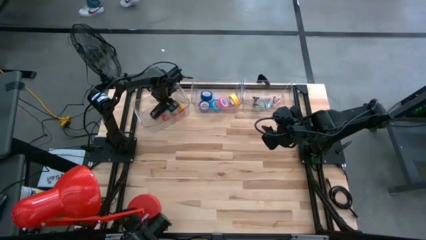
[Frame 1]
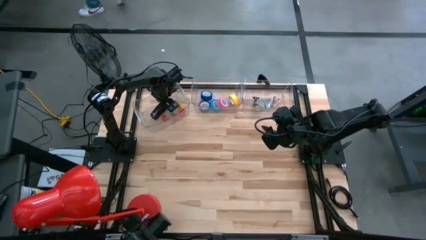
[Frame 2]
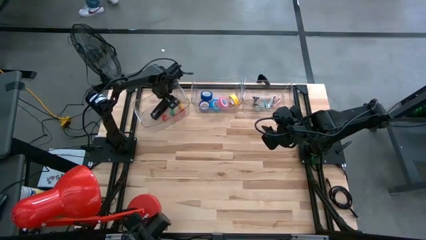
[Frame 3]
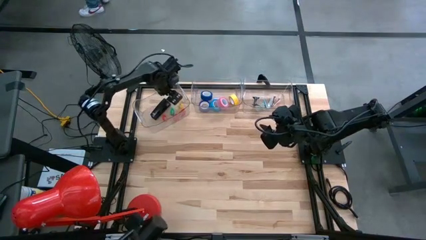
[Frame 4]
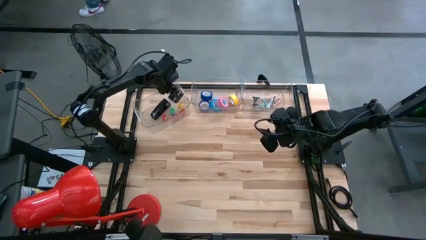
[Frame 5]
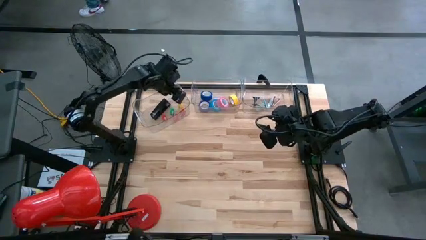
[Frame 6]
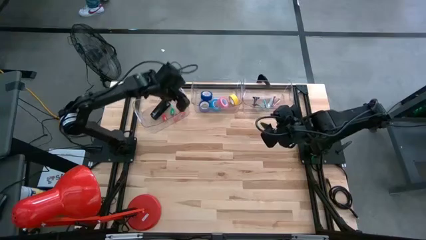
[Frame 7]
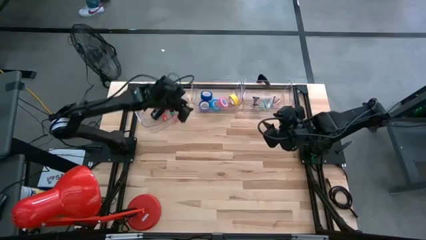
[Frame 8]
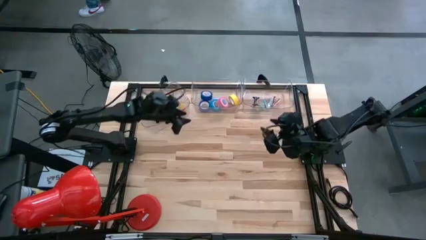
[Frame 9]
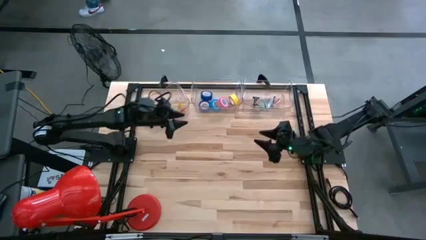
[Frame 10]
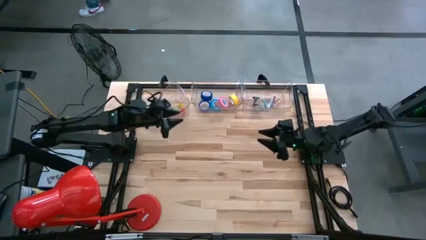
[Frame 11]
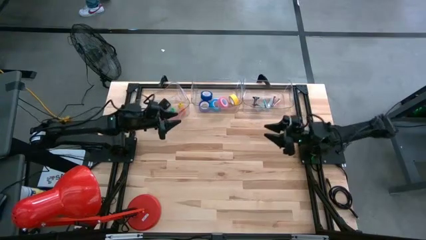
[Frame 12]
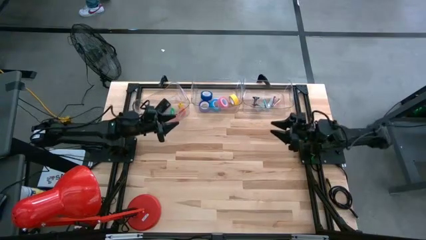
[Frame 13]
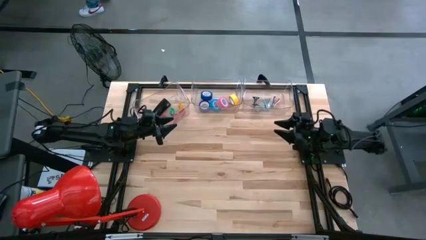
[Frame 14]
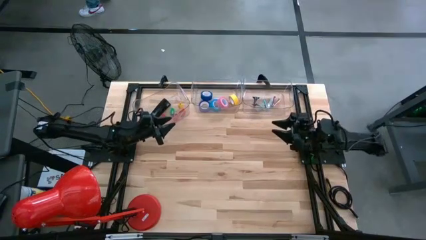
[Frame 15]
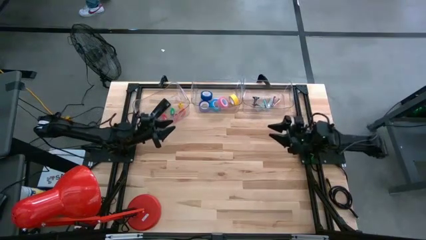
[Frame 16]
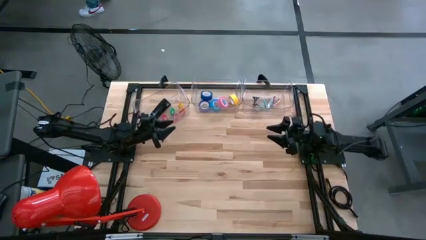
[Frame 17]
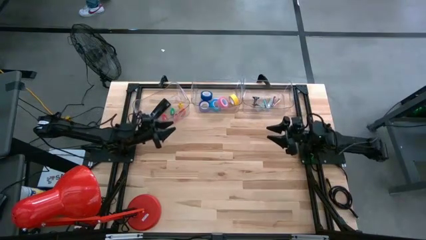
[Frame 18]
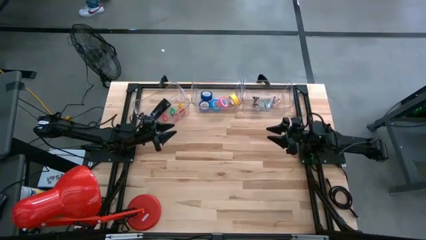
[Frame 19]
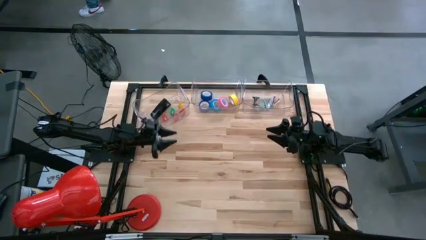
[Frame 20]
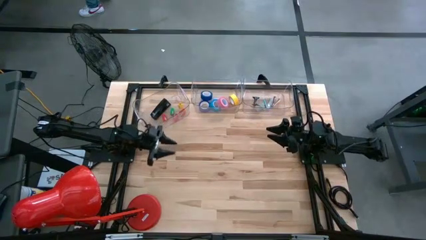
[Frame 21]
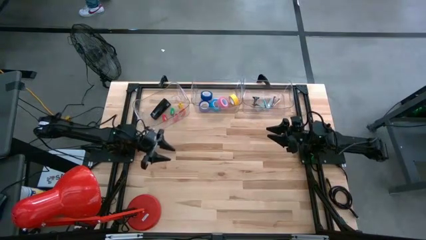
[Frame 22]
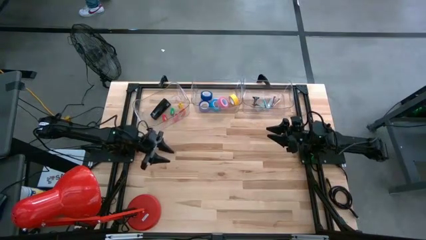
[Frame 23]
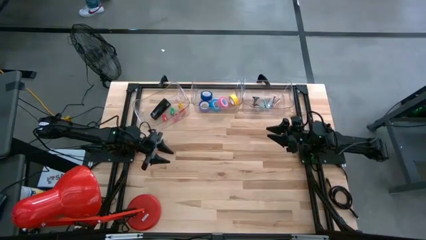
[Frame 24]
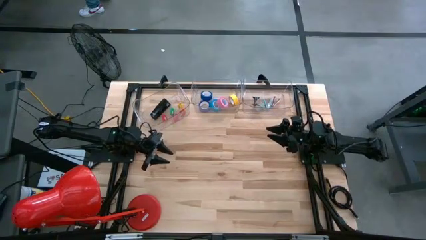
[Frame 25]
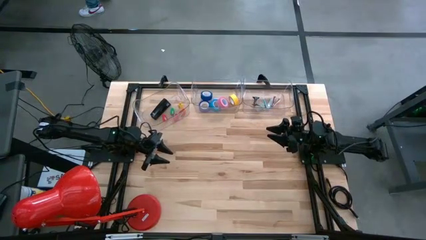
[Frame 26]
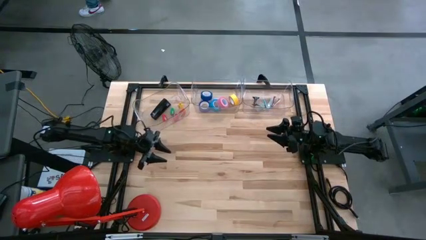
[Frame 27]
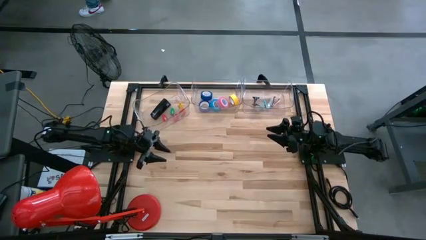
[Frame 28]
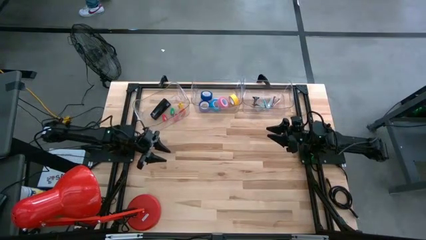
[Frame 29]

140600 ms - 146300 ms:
Task: Pick and place Stapler, Stapler remover, tape
Return to Home Position
